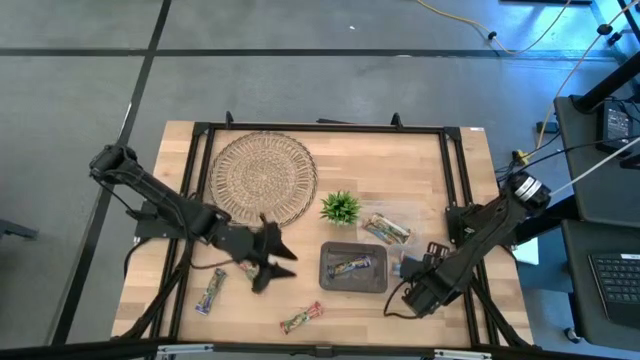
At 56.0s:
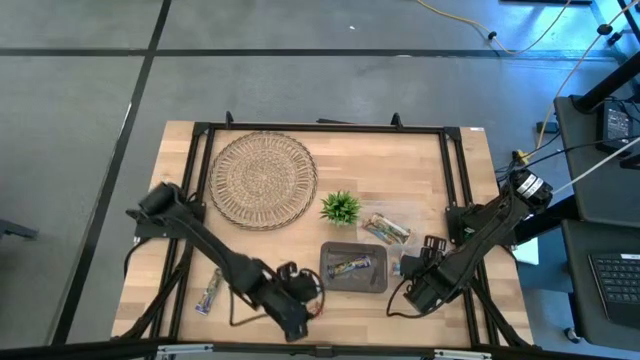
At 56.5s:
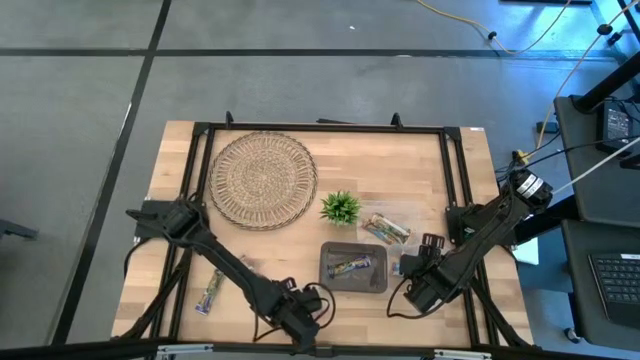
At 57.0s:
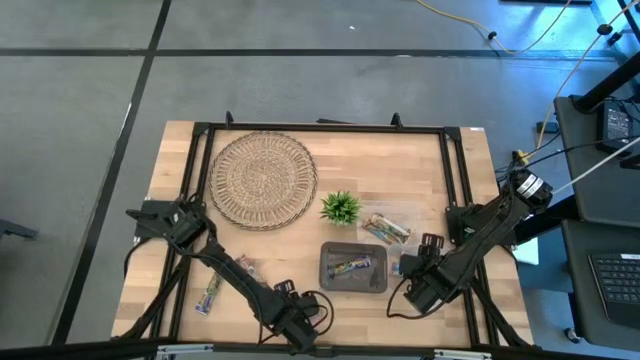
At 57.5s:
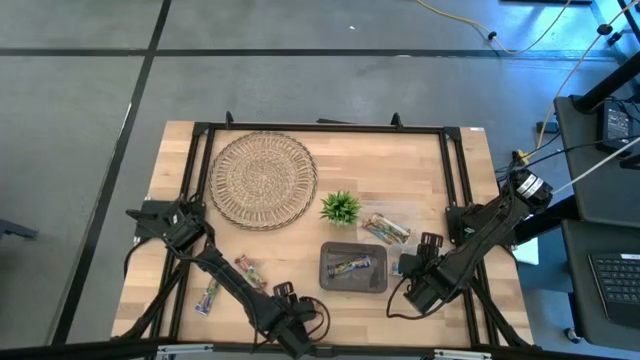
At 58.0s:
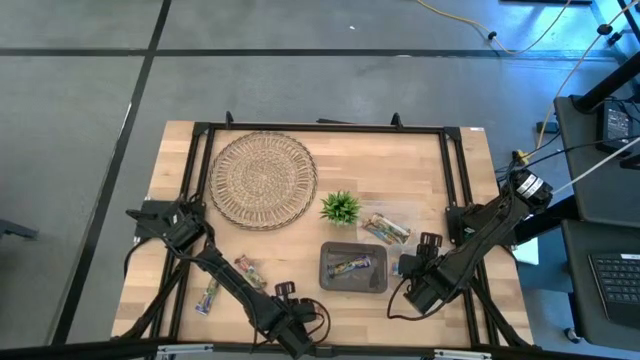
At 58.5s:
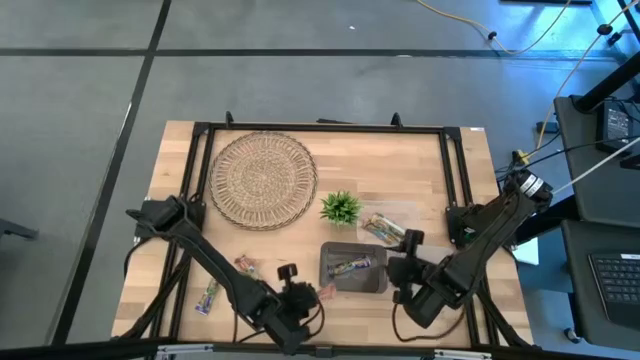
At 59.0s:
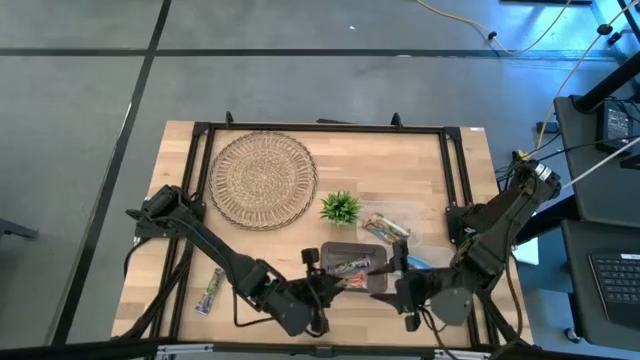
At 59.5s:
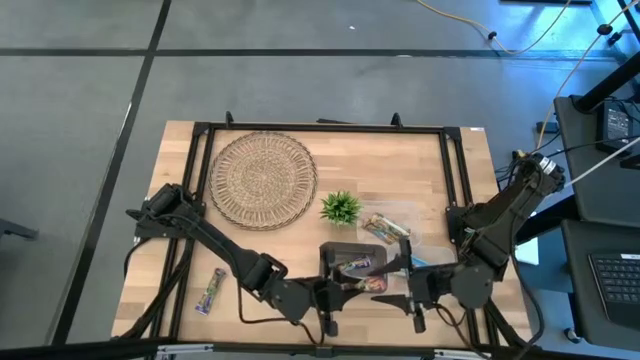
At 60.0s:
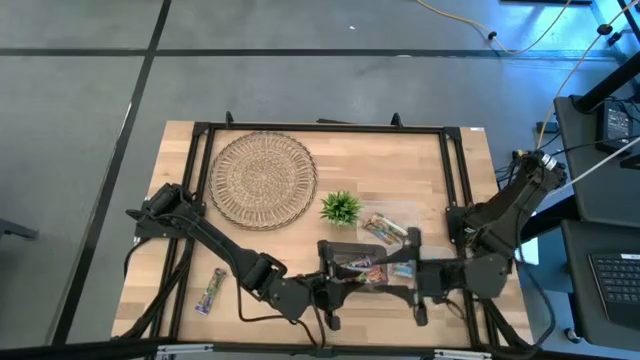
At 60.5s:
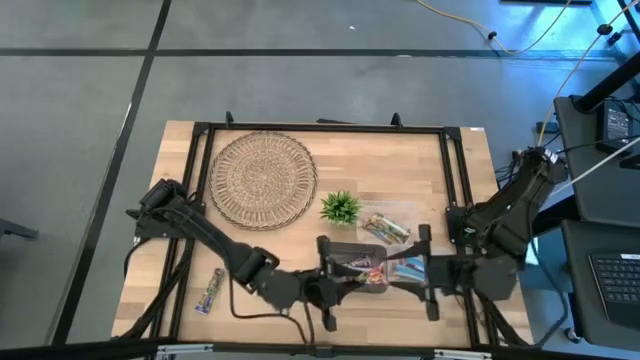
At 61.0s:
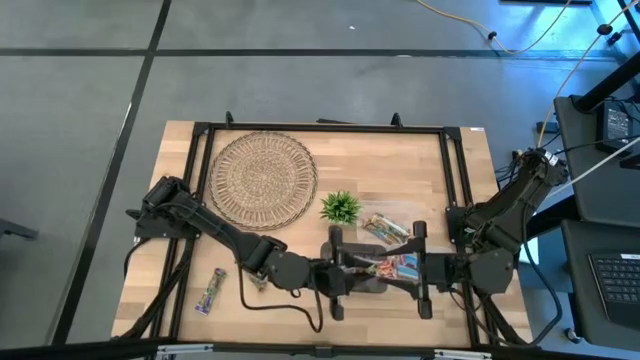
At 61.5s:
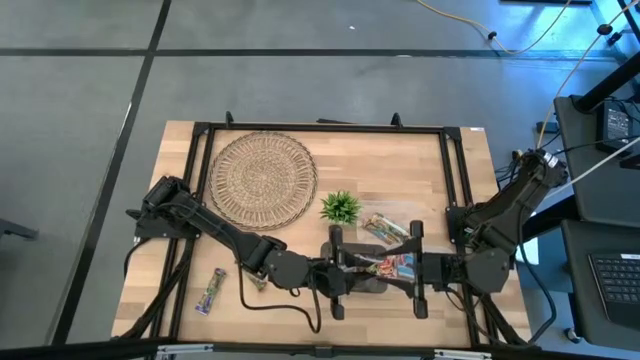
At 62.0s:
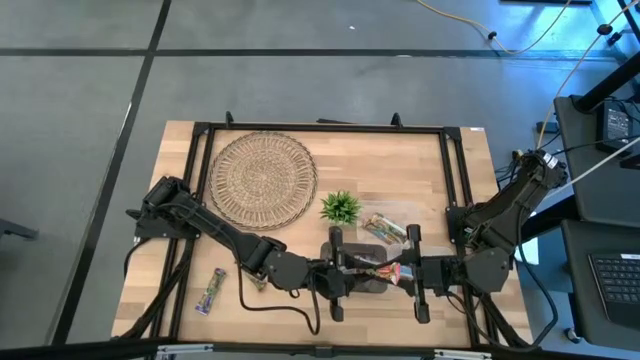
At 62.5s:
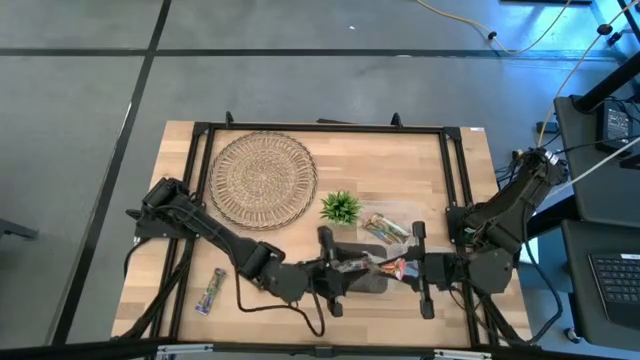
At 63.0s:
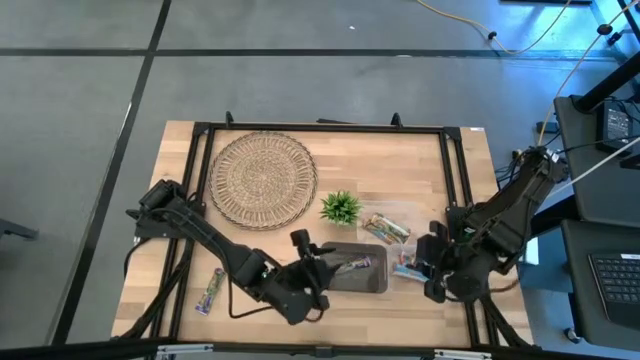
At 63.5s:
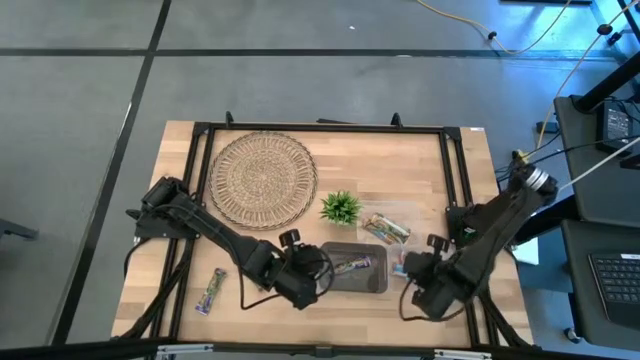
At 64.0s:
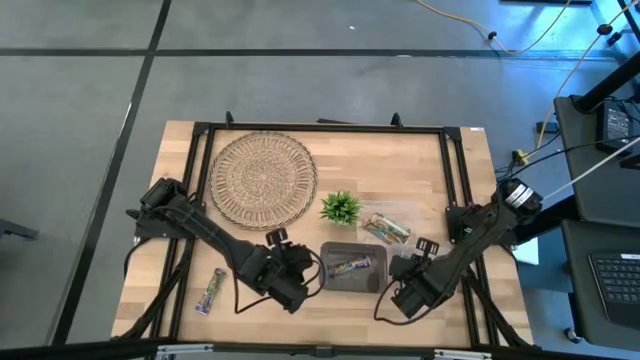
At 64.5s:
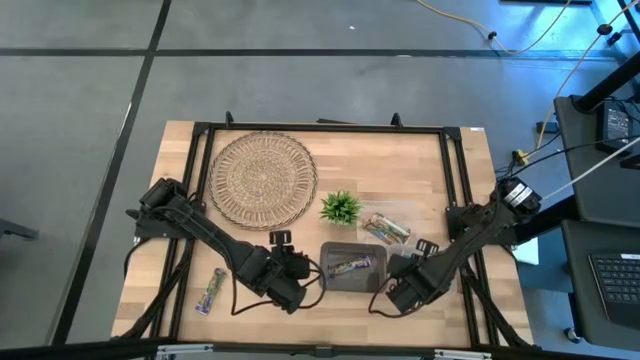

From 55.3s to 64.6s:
Task: Pick and place Granola Bars by type
Put the red granola bar into the bottom transparent bin

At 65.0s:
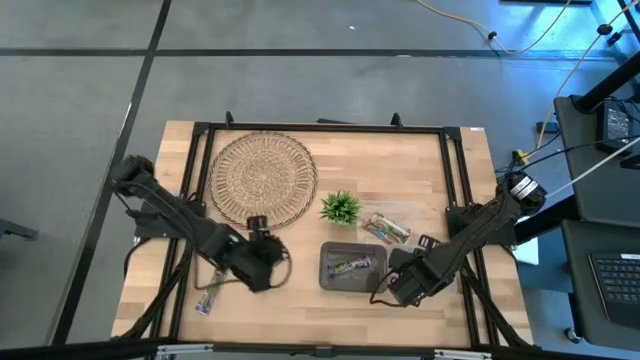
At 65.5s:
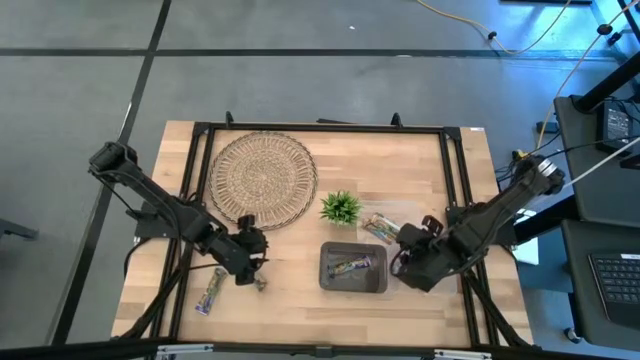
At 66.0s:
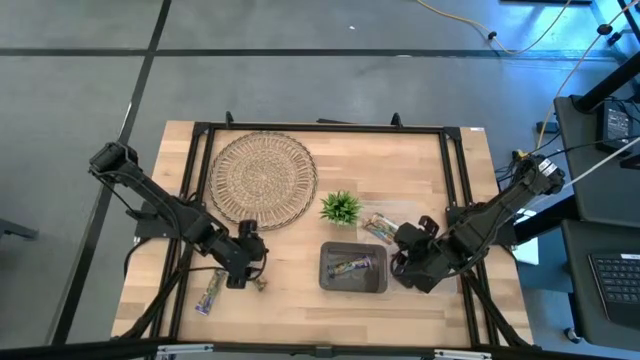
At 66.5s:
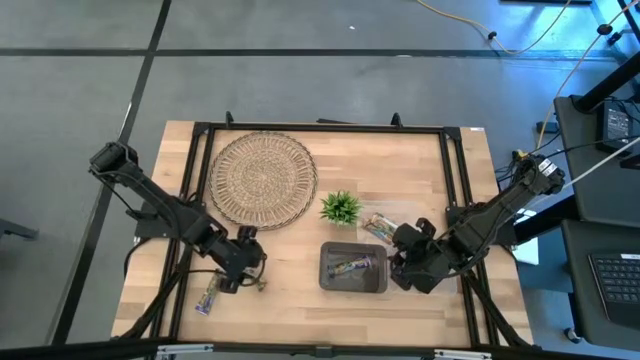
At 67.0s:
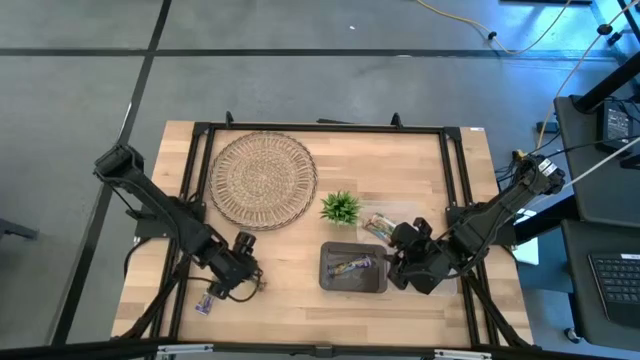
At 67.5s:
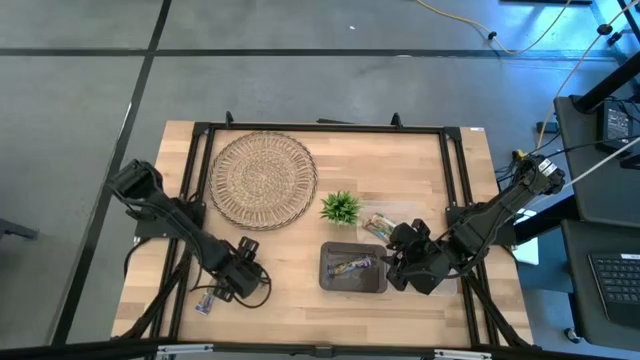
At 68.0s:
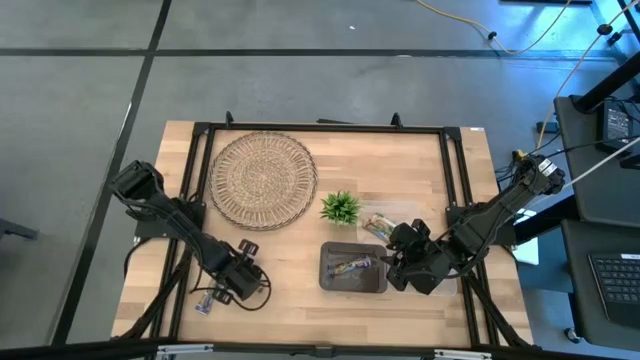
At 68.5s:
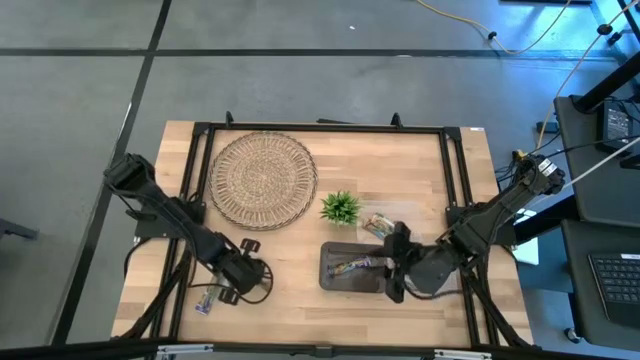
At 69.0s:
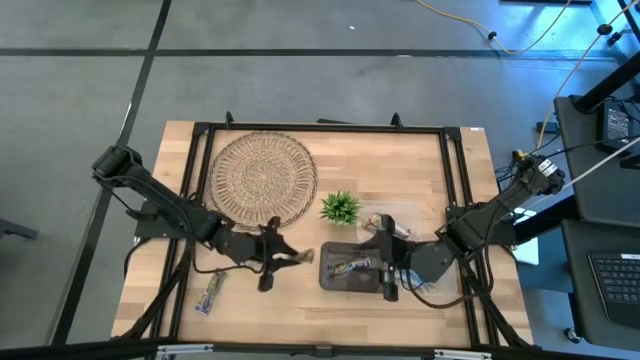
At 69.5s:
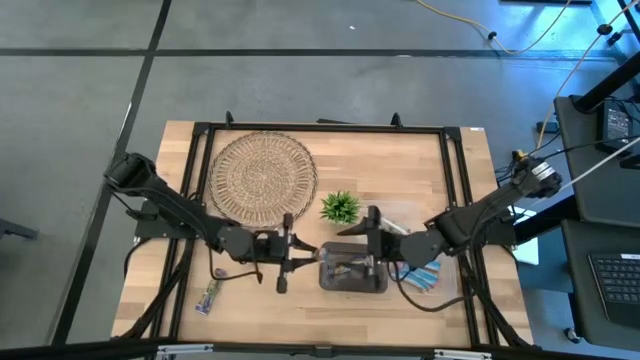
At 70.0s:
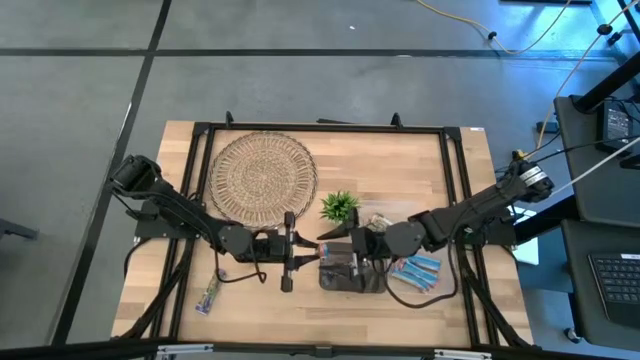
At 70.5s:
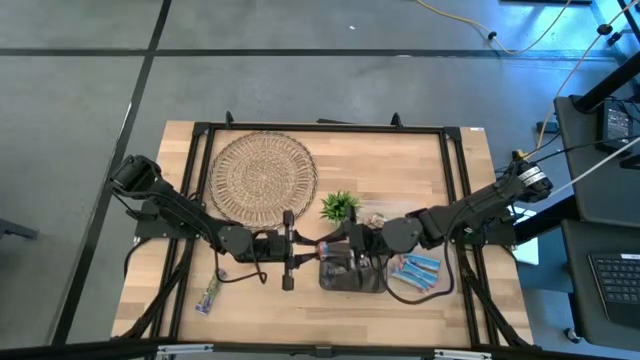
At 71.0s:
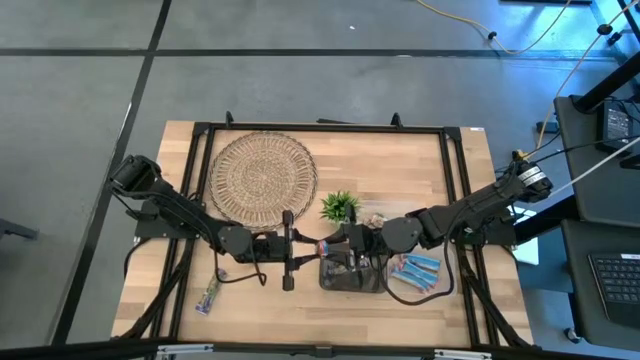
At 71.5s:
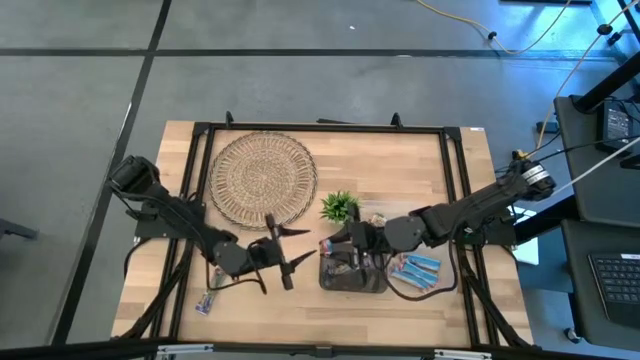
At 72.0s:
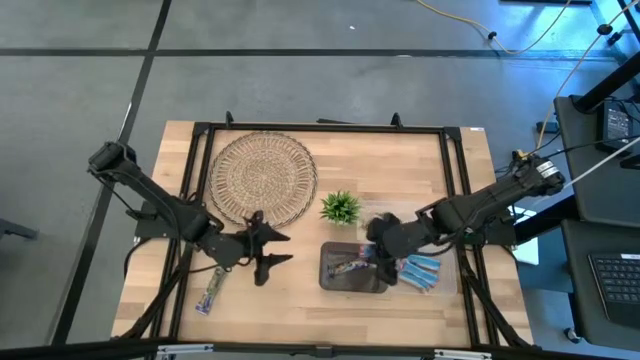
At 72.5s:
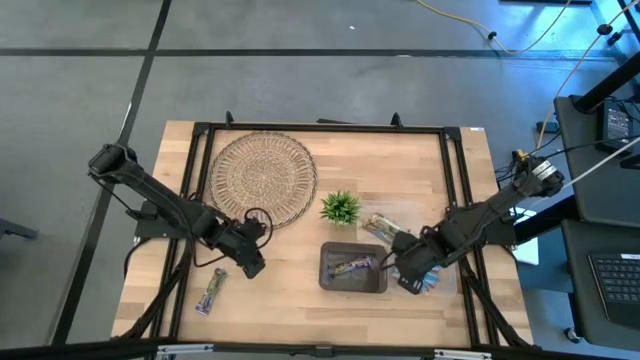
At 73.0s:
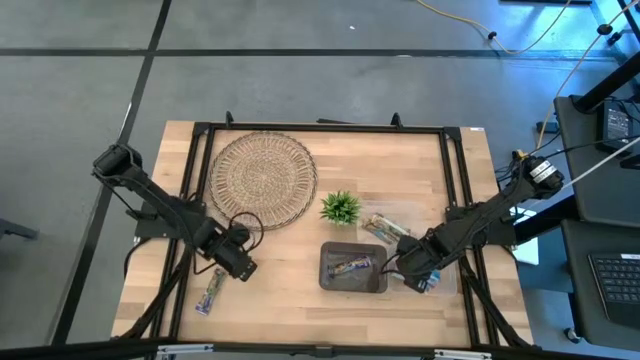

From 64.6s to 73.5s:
Put the red granola bar into the bottom transparent bin

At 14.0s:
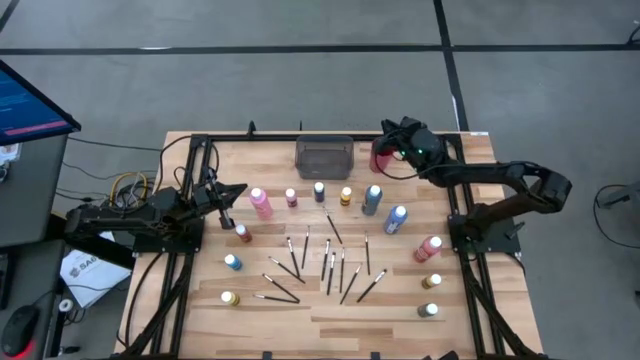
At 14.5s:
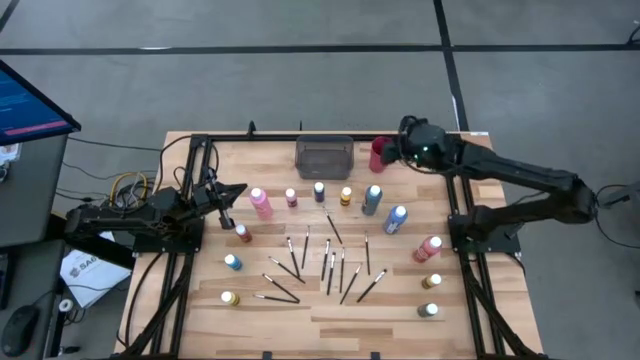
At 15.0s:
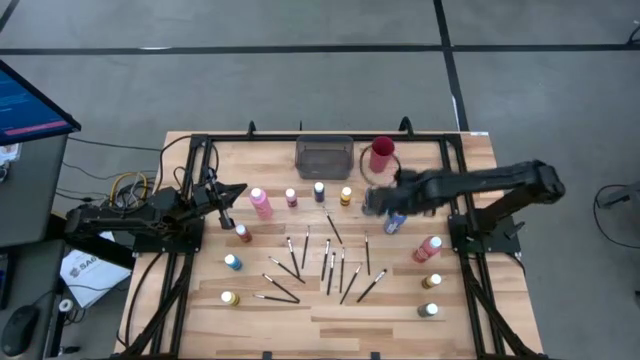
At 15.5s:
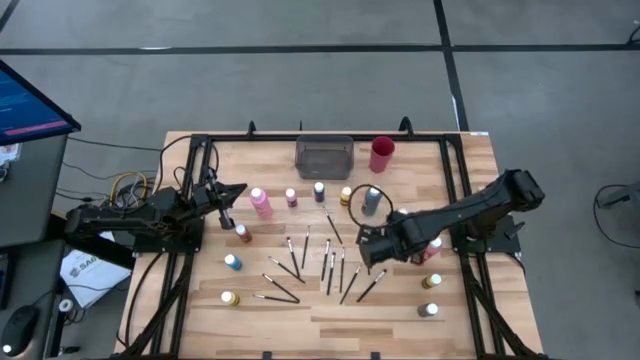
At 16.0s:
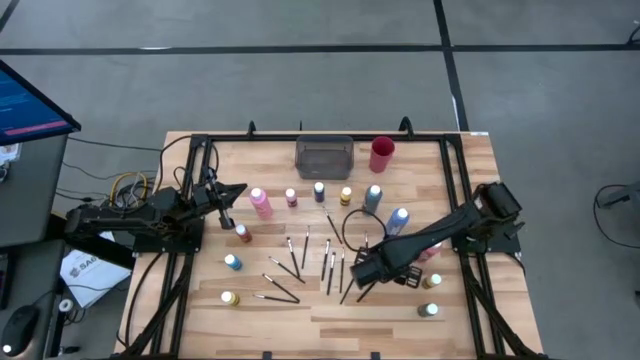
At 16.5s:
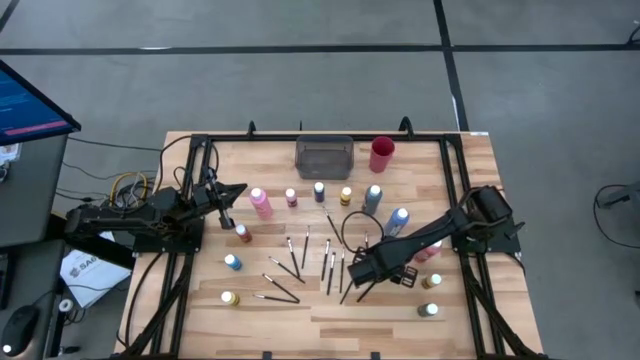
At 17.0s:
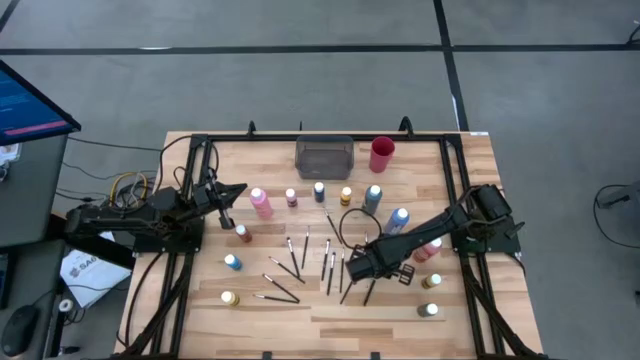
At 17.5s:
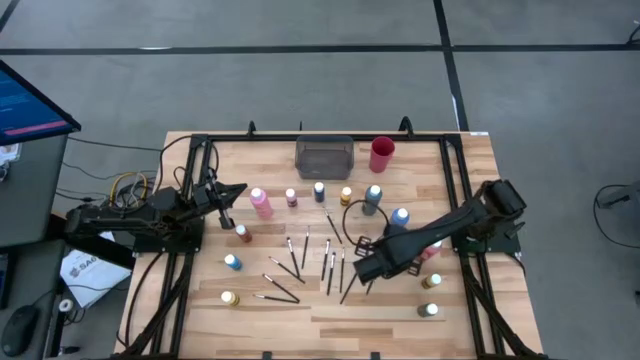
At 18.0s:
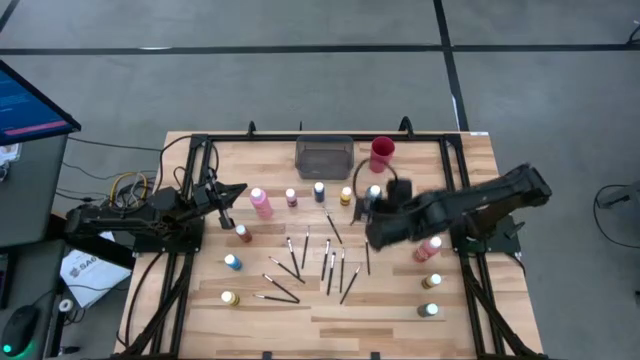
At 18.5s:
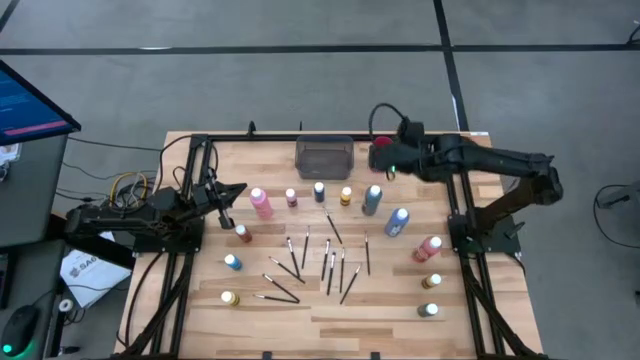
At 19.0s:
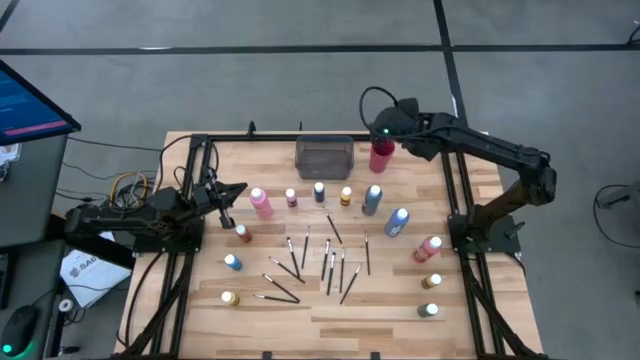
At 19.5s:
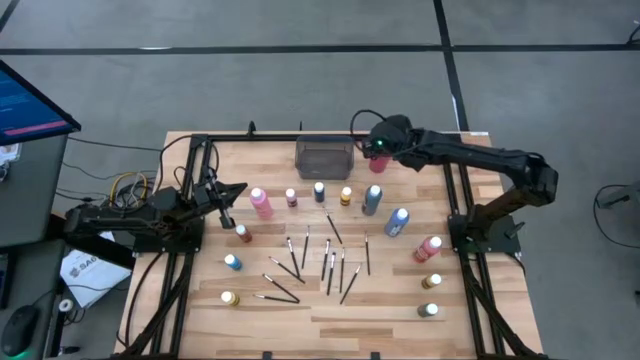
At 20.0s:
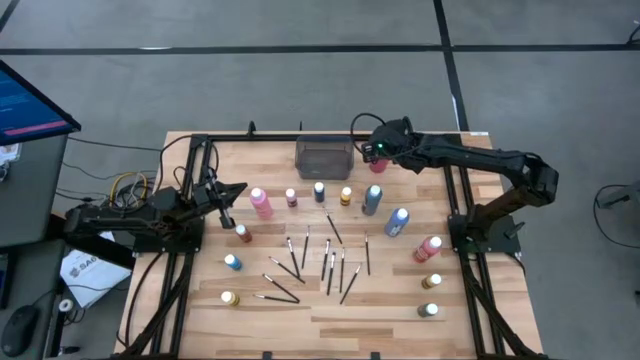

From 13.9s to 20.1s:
Task: Pick & Place Paint Supplies
Put the black paintbrush into the red cup
